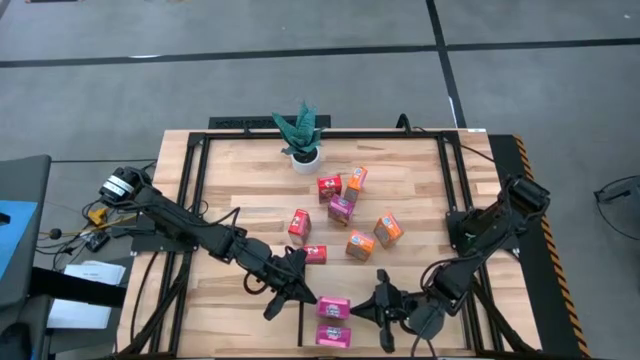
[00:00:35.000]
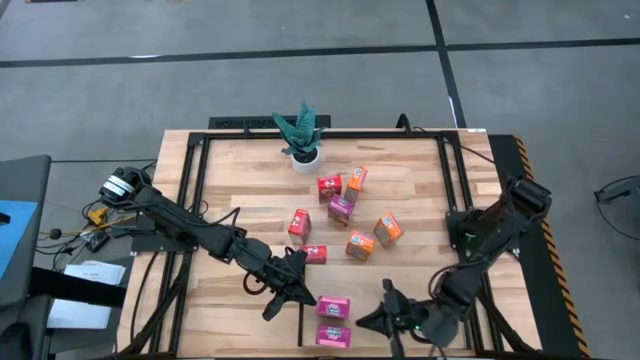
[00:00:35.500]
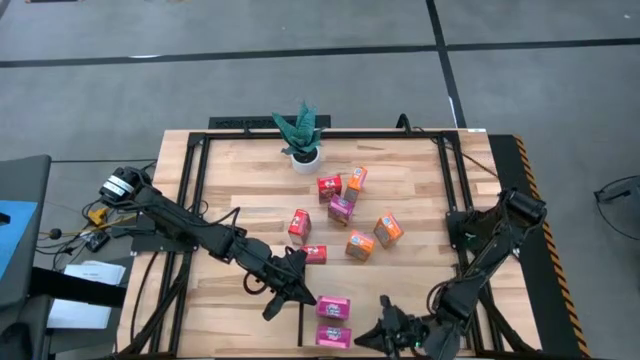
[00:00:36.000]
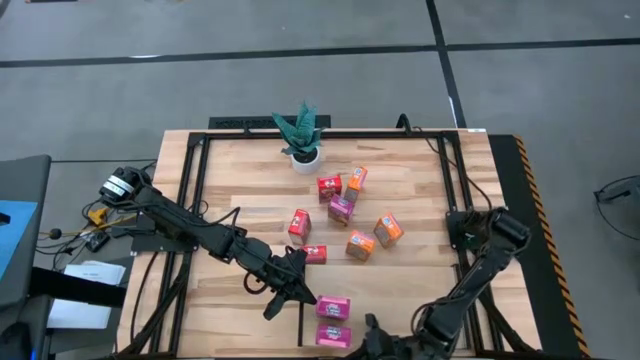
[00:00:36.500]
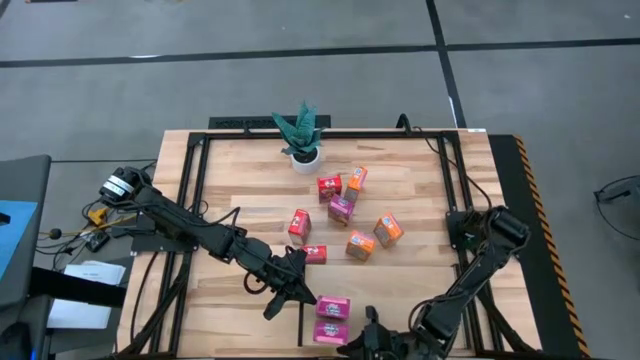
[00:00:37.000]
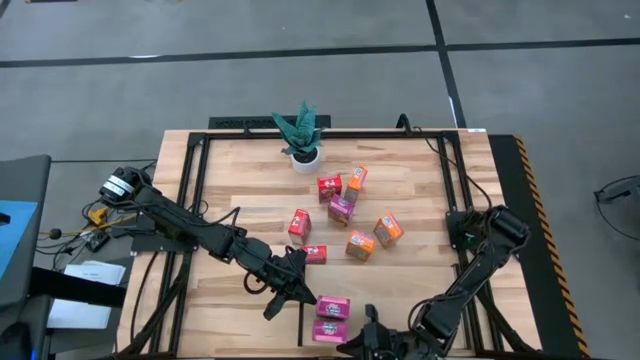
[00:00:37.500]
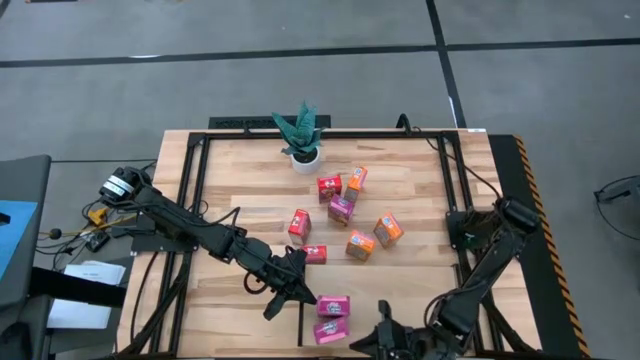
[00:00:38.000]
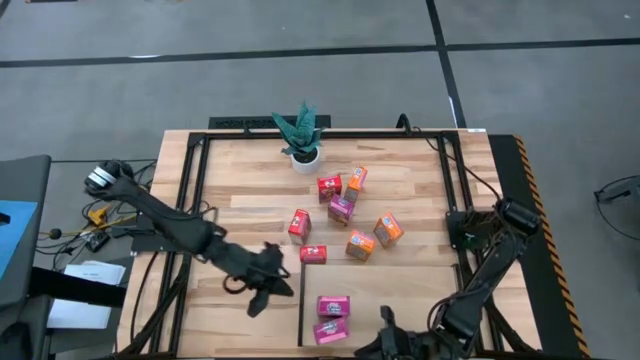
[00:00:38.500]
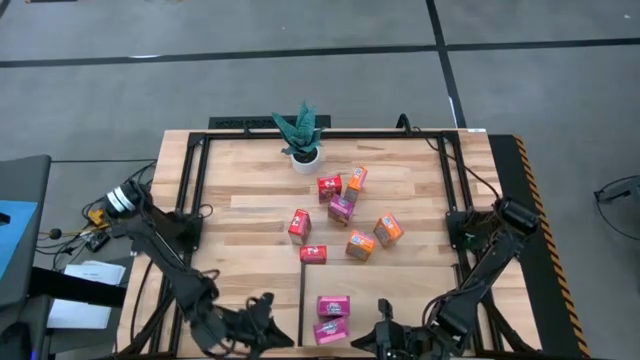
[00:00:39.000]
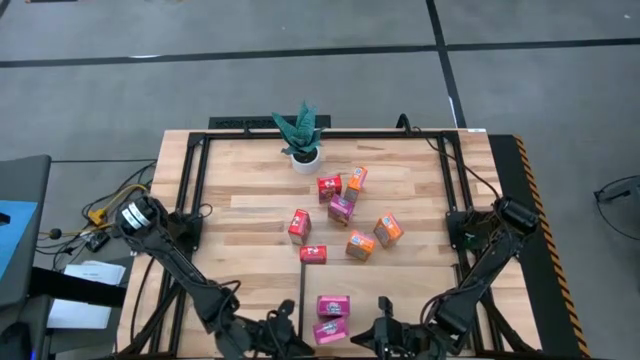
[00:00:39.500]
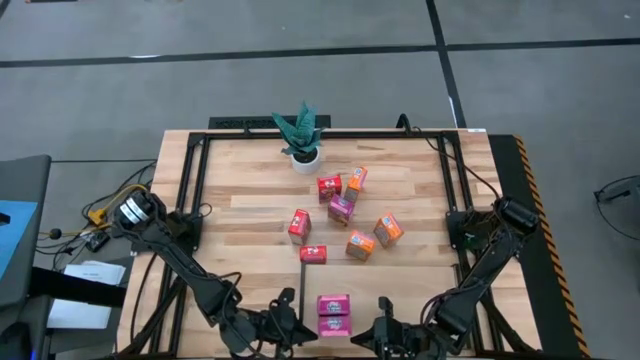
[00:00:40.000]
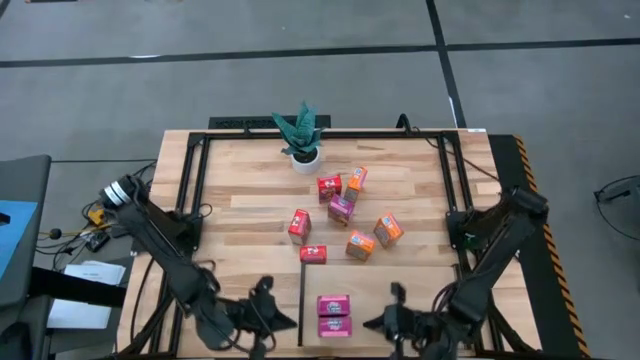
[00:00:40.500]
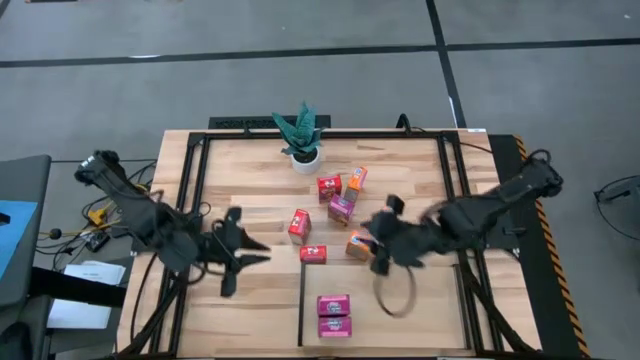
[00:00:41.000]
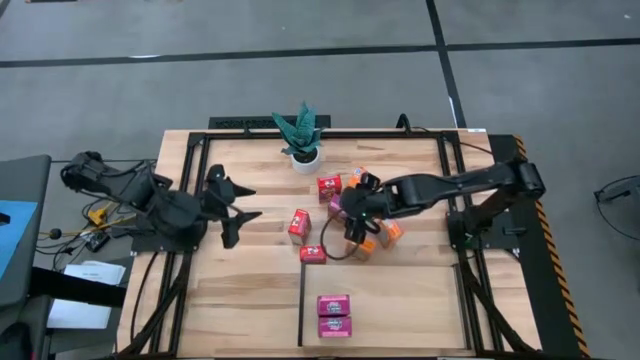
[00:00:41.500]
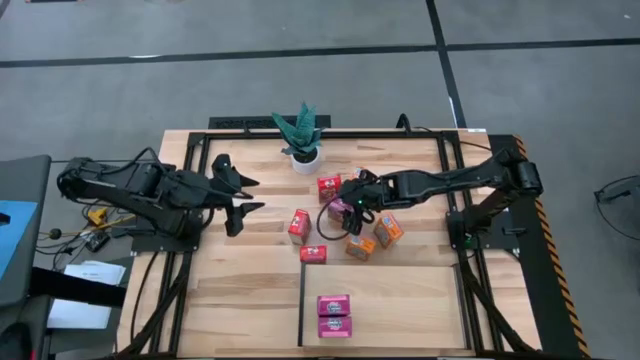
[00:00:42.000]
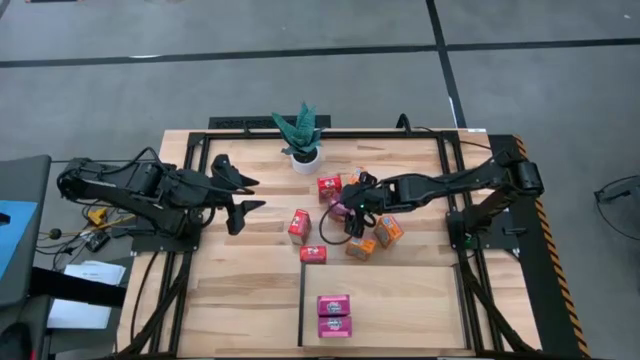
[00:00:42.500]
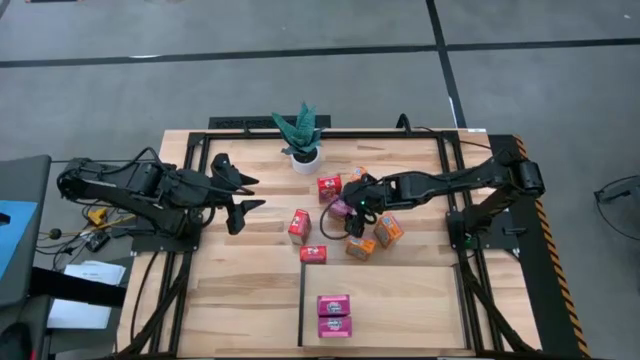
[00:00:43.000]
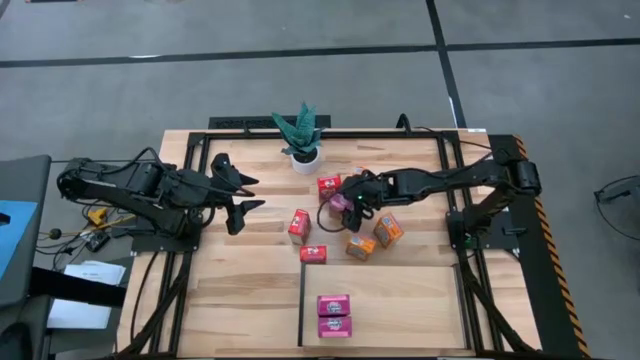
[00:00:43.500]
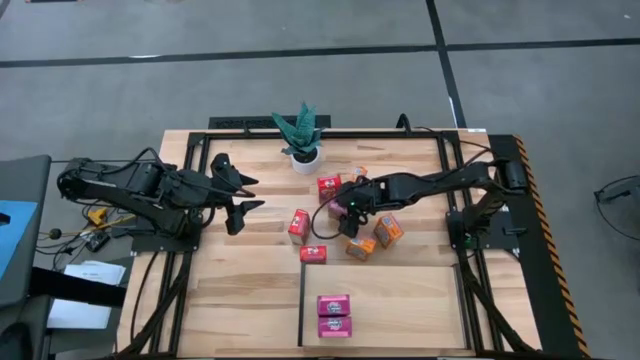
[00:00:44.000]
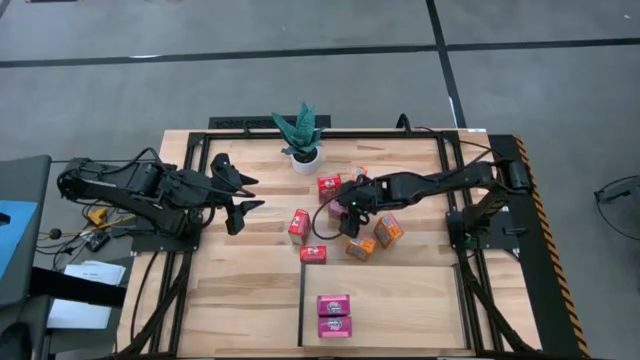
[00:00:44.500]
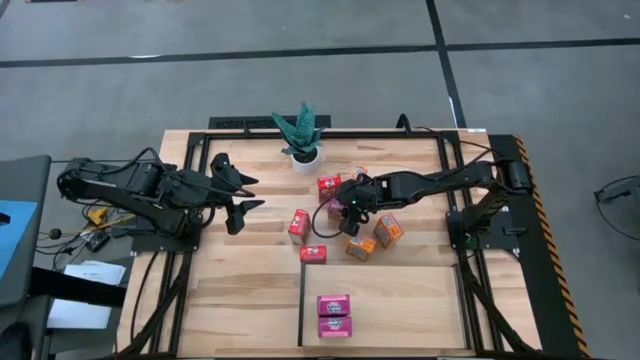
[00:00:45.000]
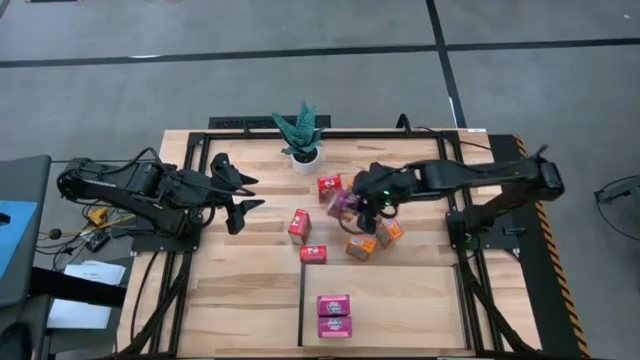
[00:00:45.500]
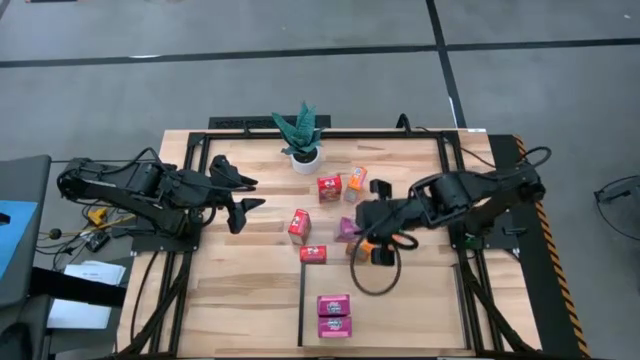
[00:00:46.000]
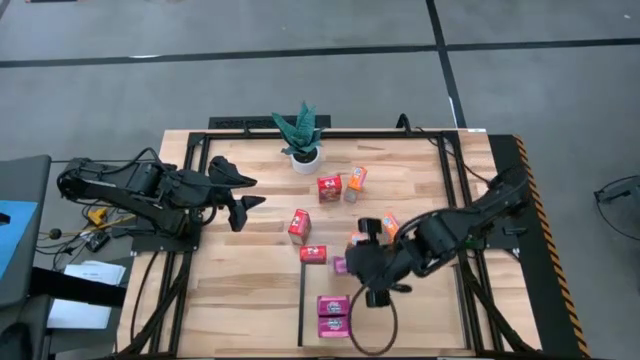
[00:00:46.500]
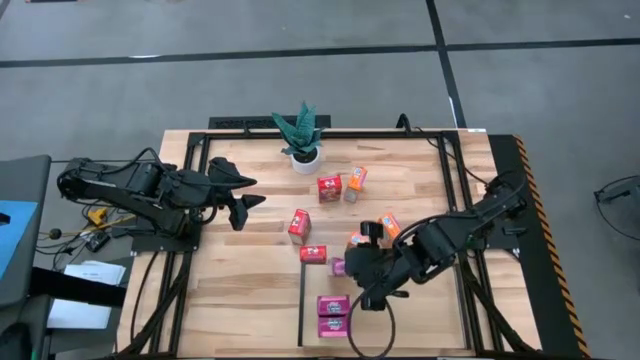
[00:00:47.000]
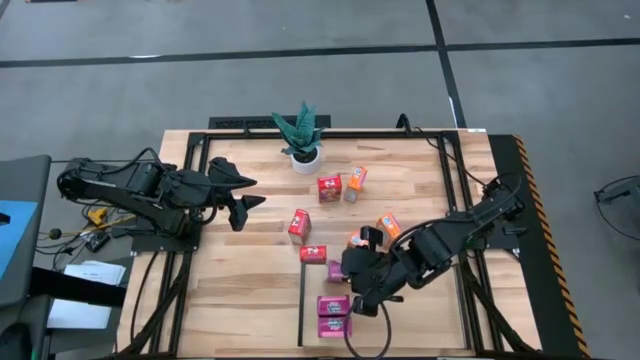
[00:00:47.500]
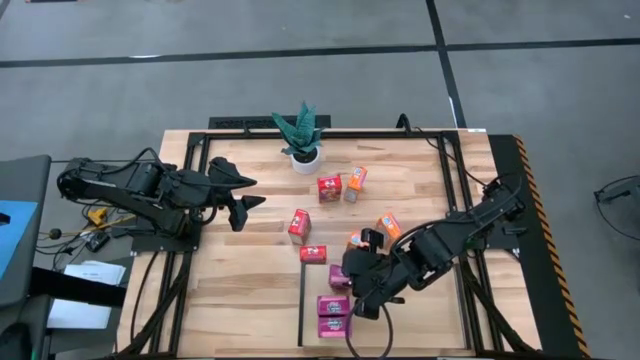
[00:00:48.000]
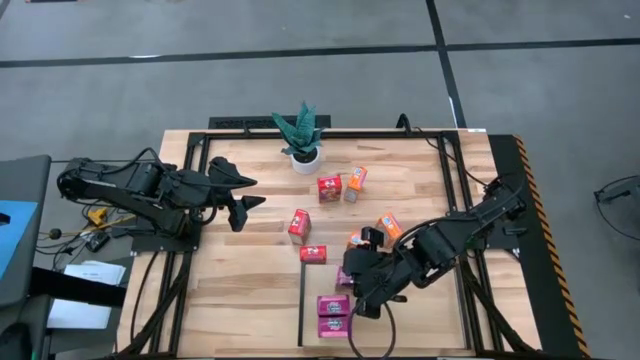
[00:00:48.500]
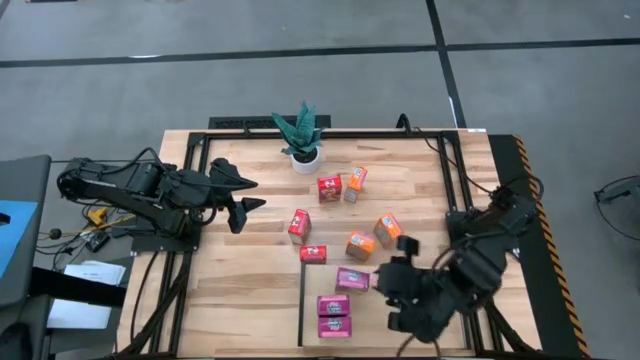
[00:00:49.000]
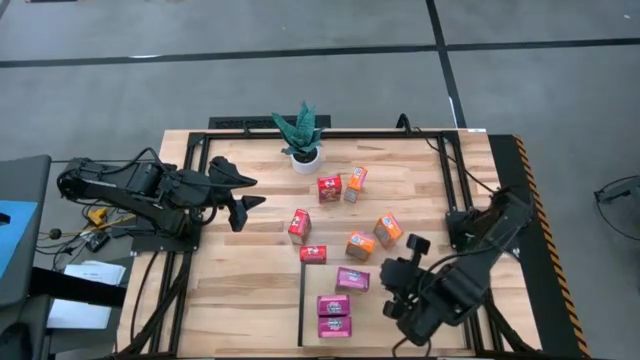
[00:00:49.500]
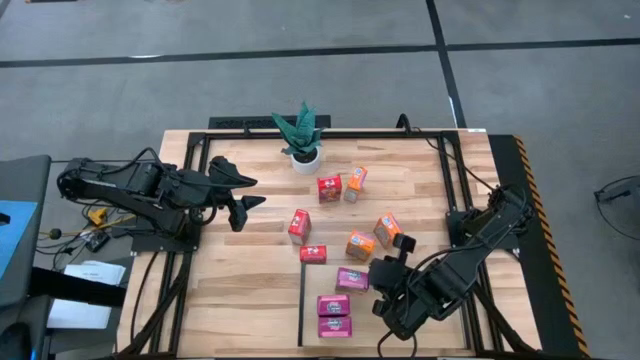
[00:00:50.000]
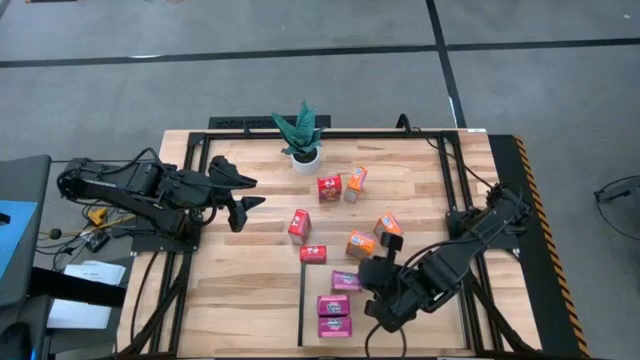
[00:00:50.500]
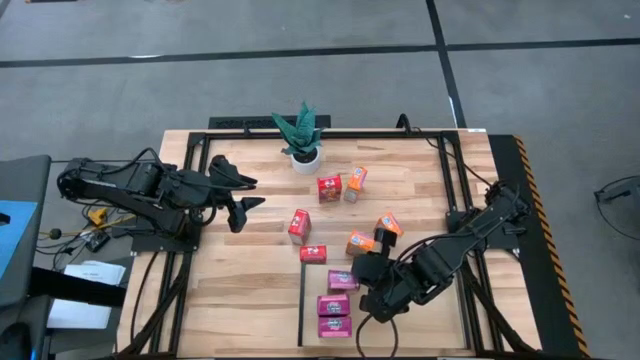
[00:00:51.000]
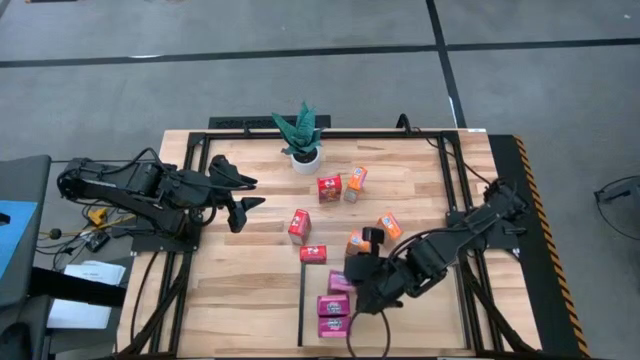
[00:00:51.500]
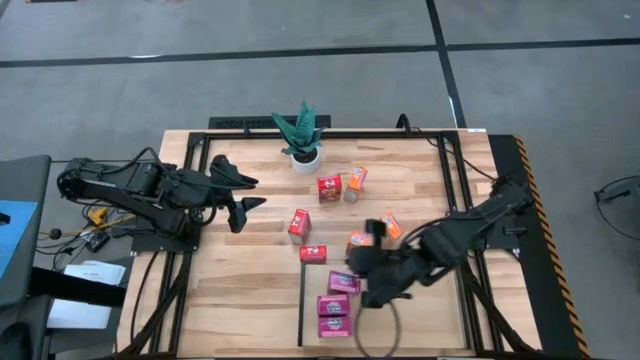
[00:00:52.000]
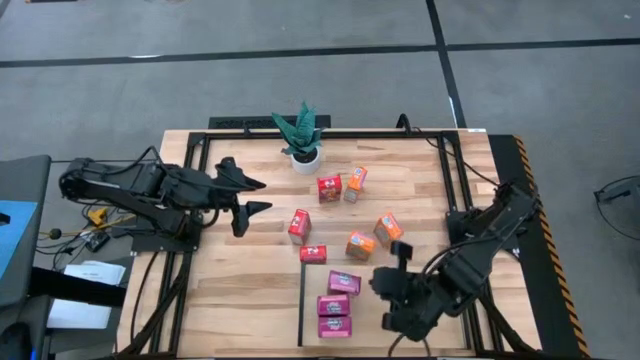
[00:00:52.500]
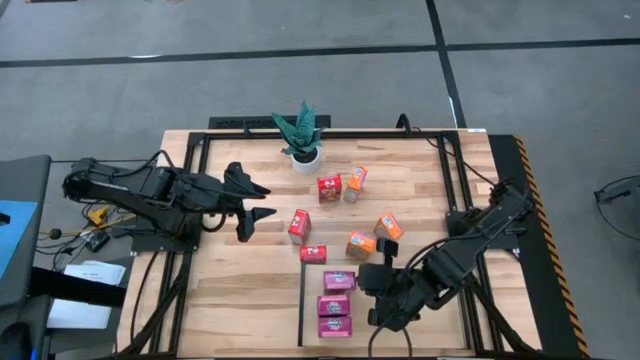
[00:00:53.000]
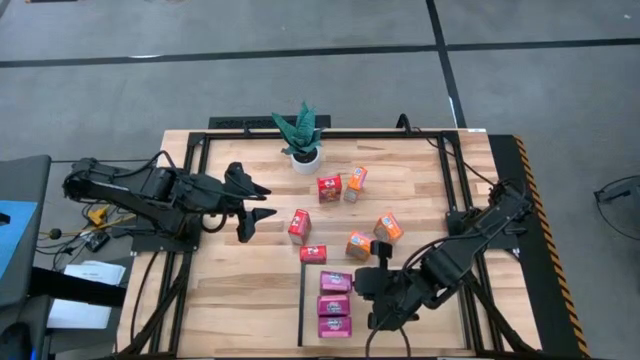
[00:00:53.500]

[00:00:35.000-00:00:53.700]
Task: Stack cereal on shelf
Put the purple cereal box on the upper left shelf
